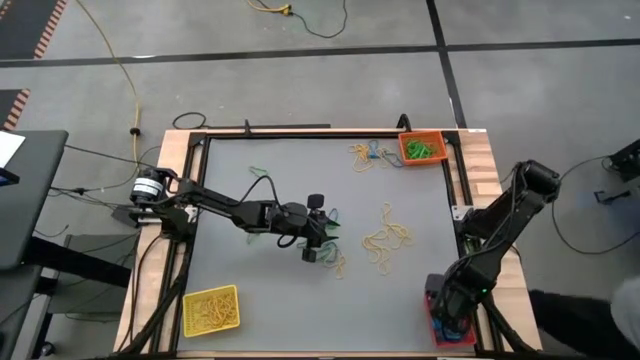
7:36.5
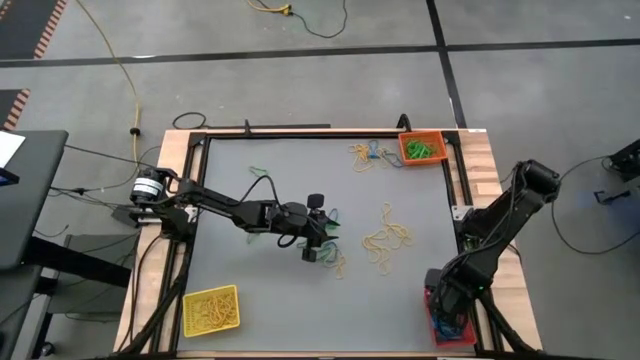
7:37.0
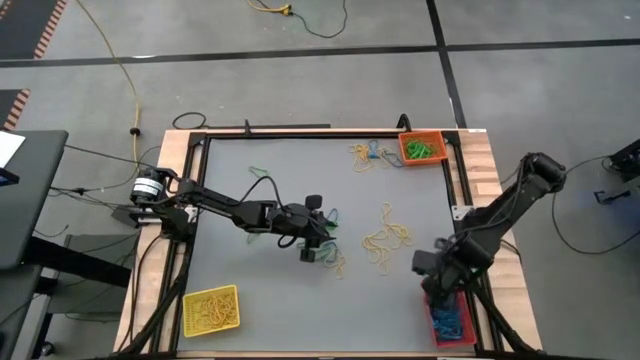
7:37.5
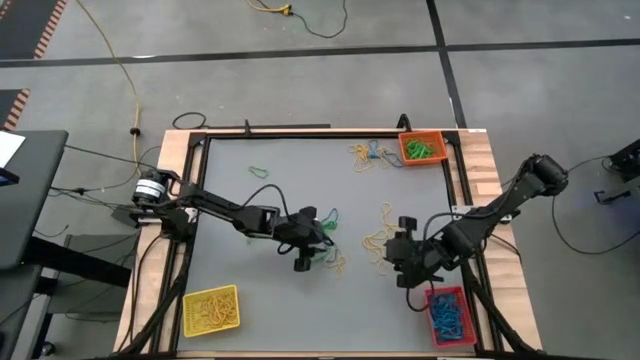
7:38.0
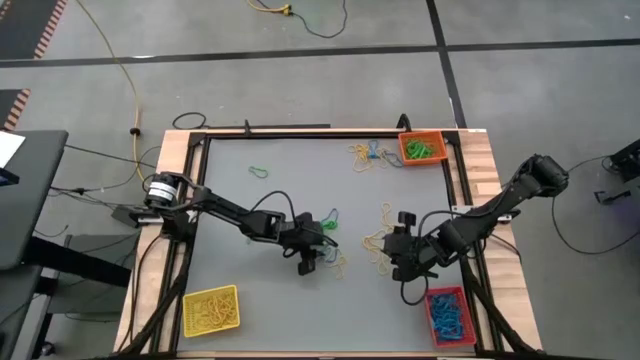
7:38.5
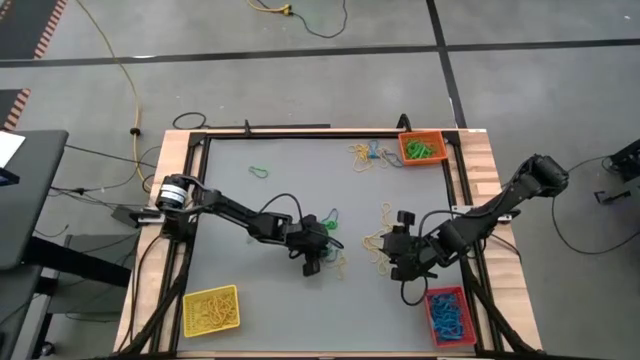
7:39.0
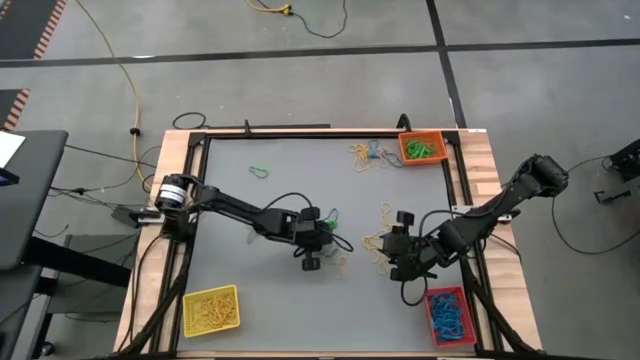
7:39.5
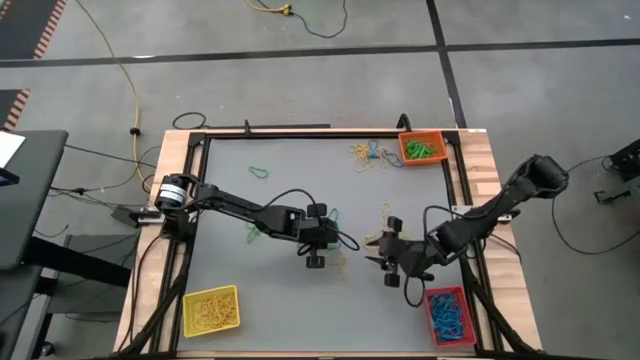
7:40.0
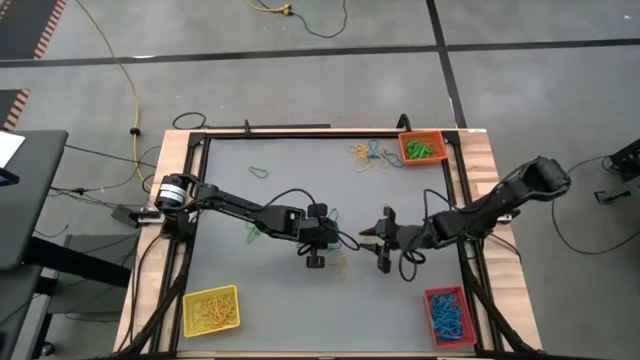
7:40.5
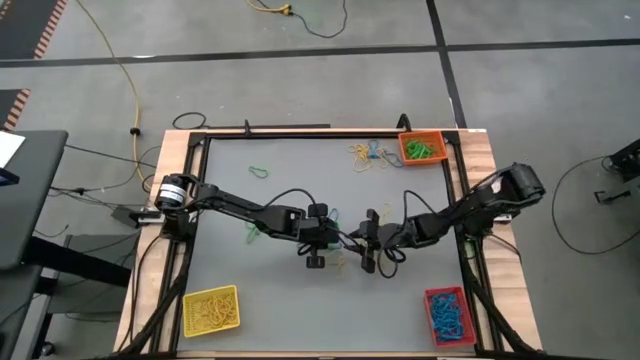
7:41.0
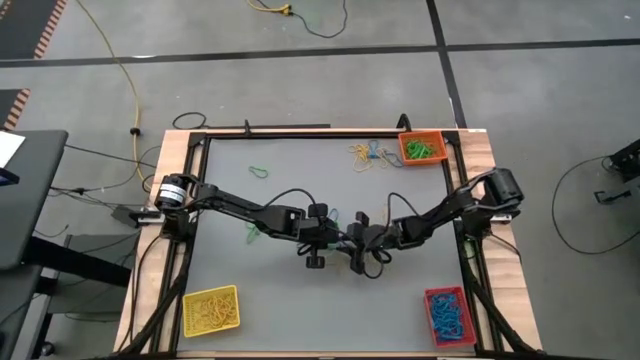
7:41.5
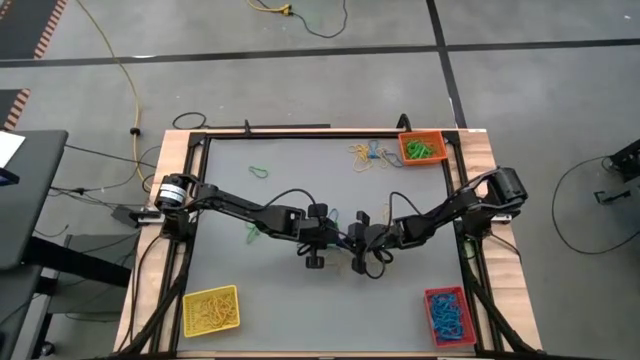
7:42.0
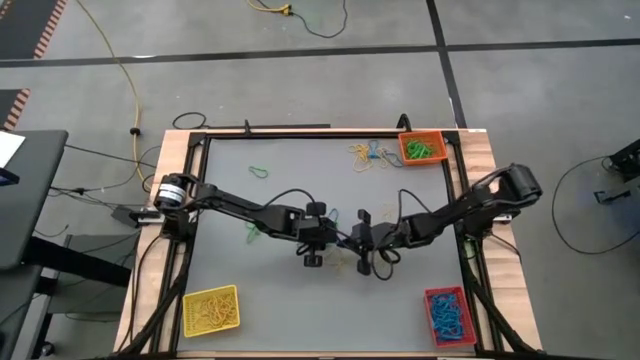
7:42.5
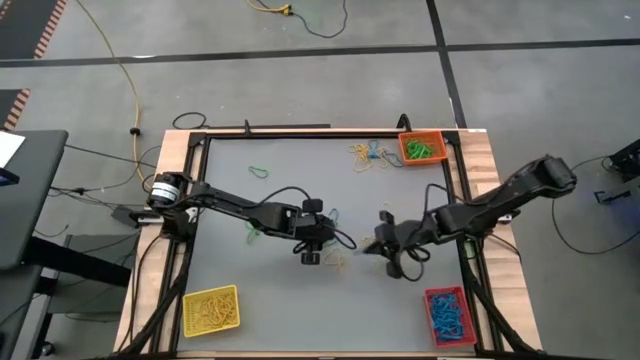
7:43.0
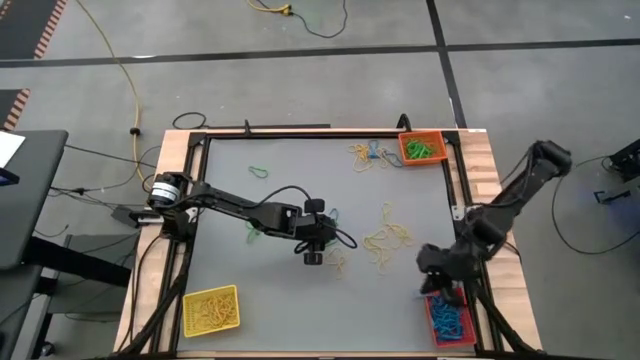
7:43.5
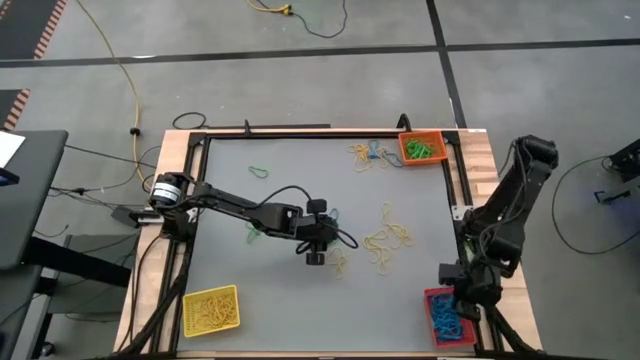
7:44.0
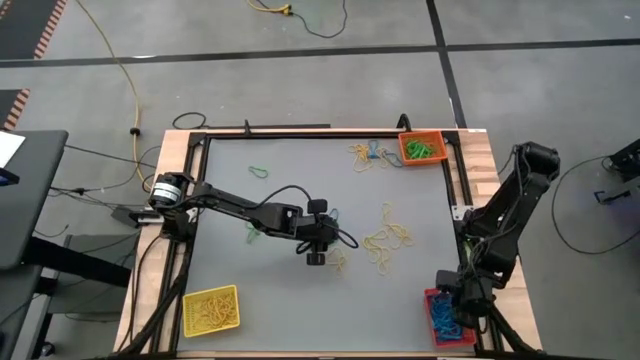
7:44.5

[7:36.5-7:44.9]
Task: Sort rubber bands into baskets
Put the blue rubber band into the red bin

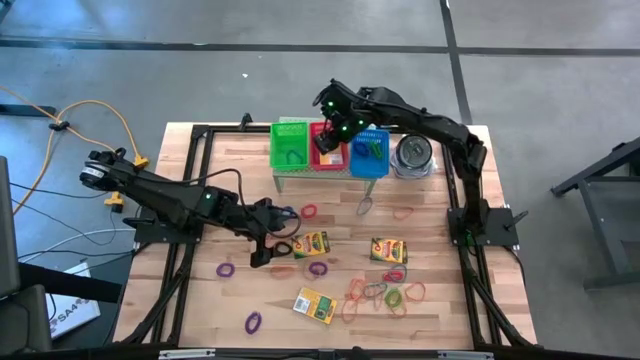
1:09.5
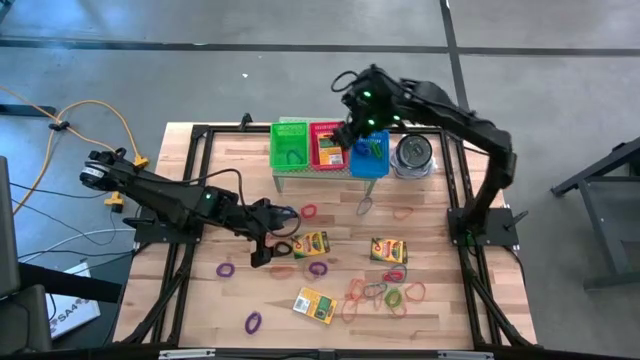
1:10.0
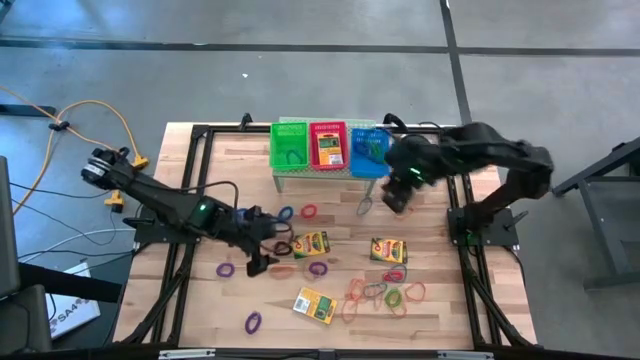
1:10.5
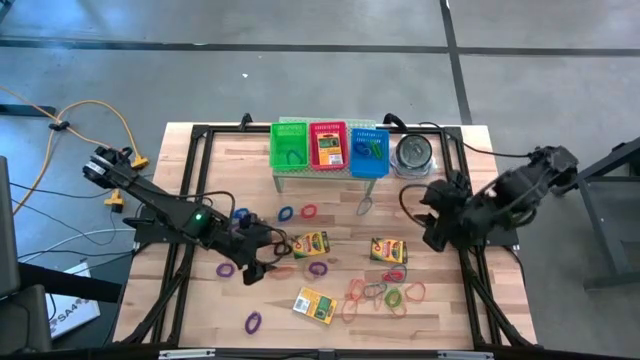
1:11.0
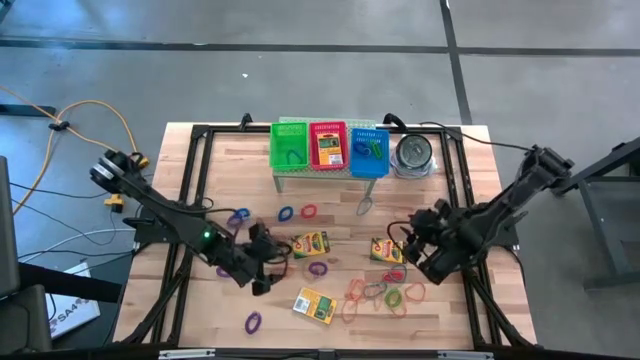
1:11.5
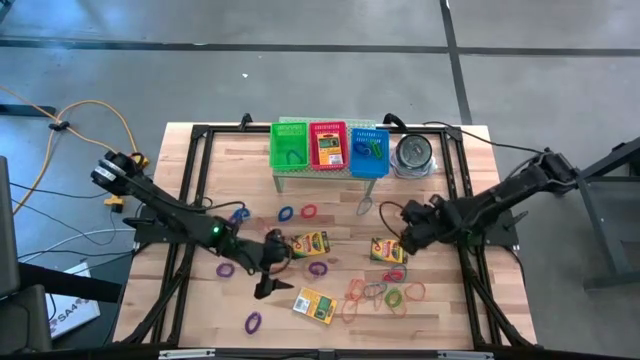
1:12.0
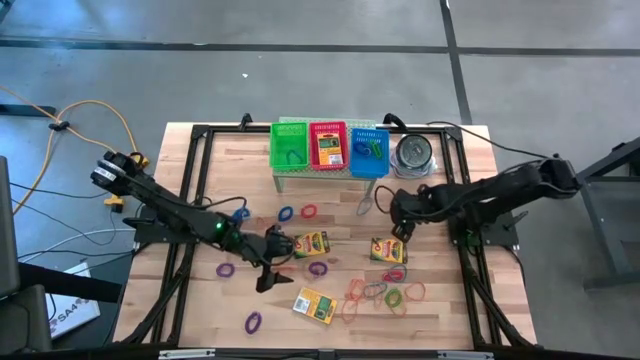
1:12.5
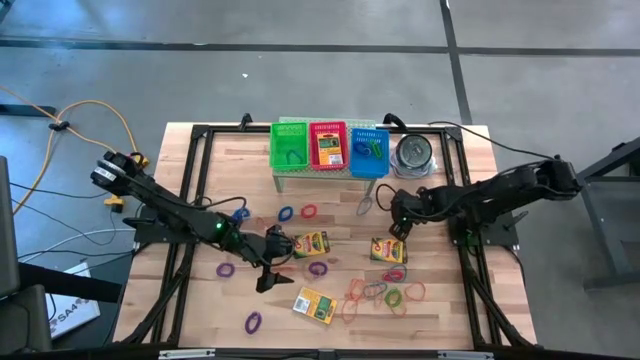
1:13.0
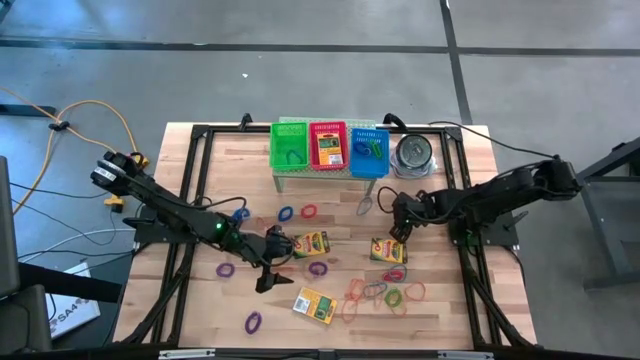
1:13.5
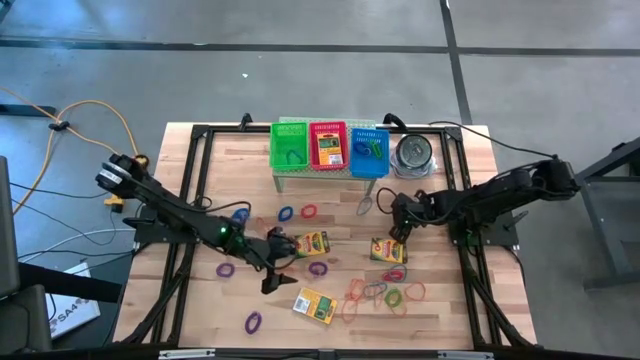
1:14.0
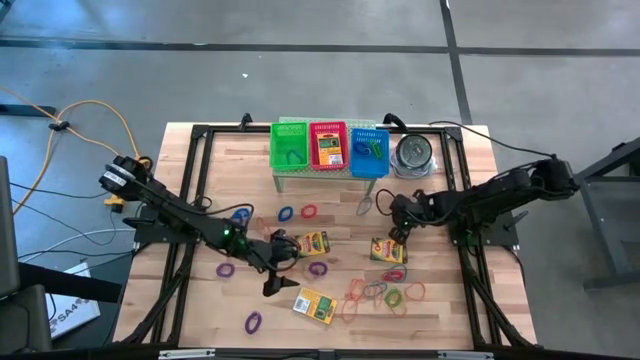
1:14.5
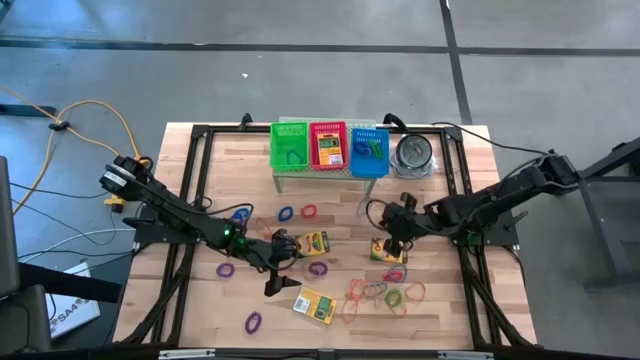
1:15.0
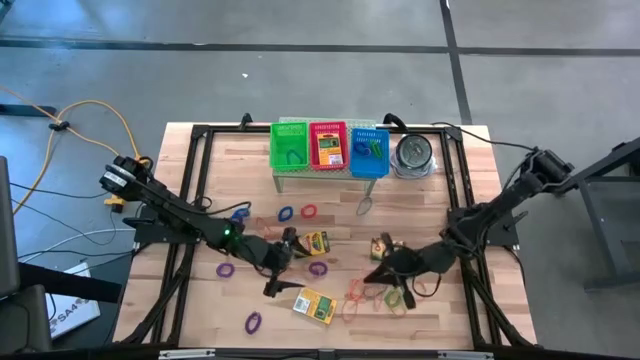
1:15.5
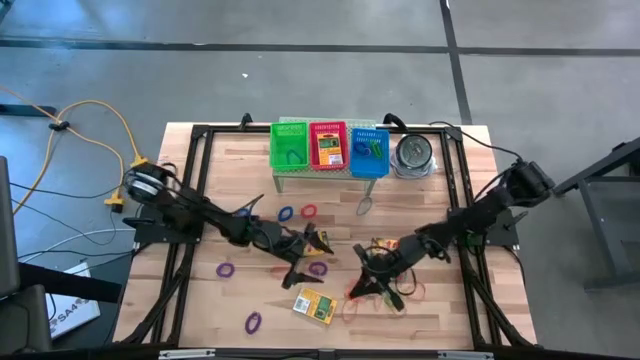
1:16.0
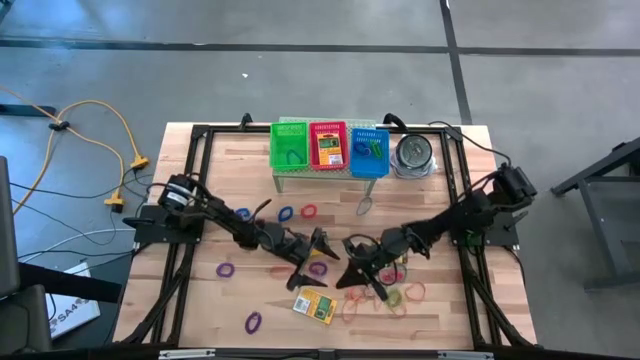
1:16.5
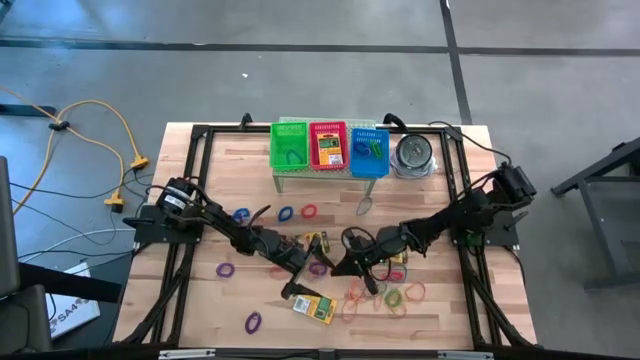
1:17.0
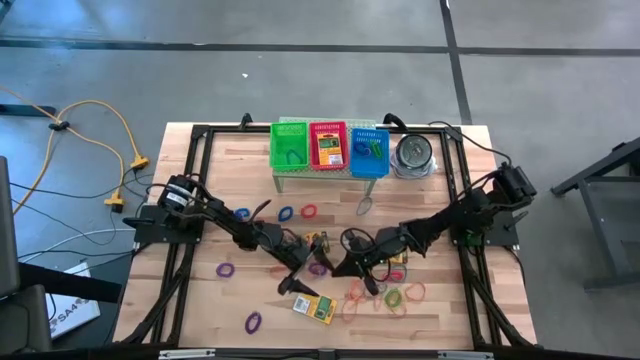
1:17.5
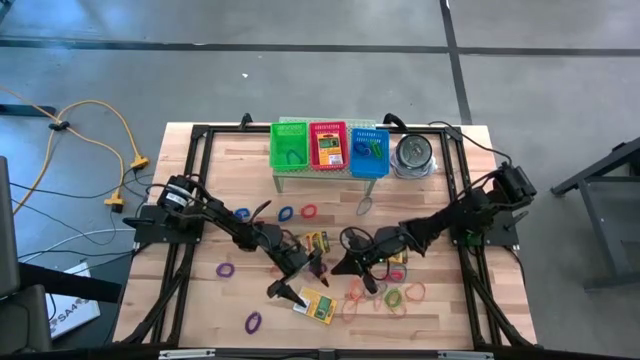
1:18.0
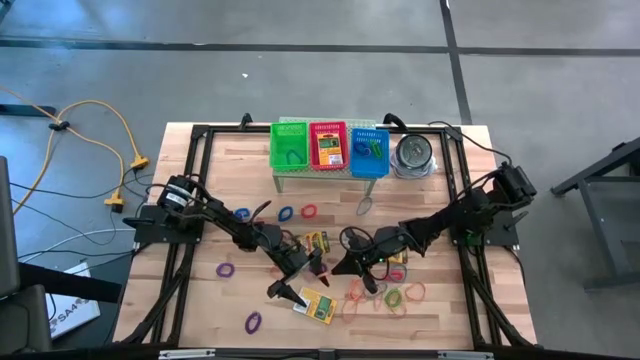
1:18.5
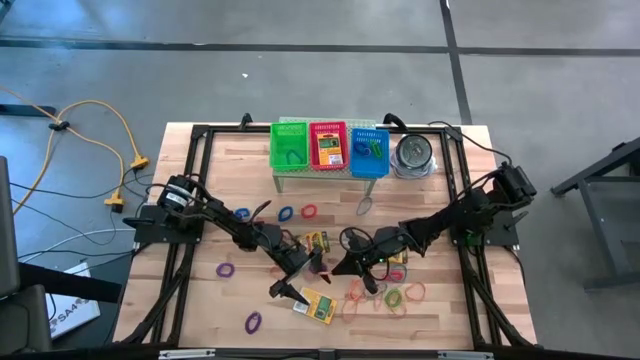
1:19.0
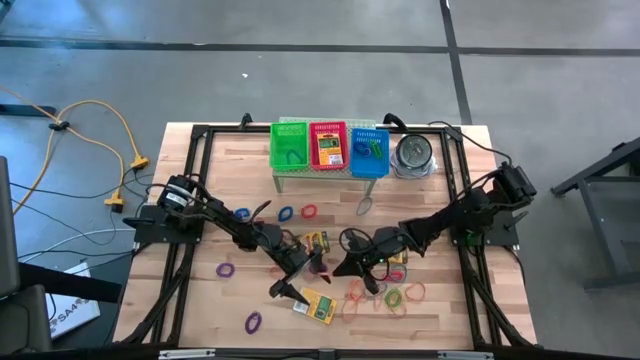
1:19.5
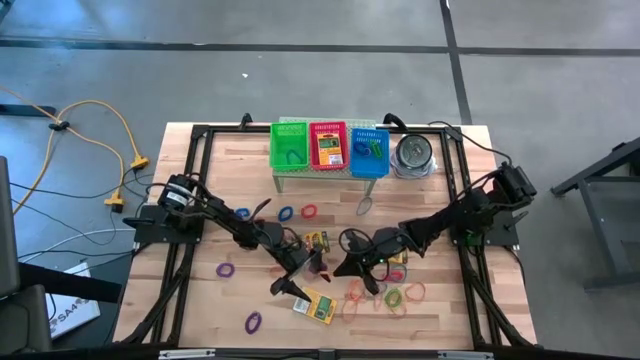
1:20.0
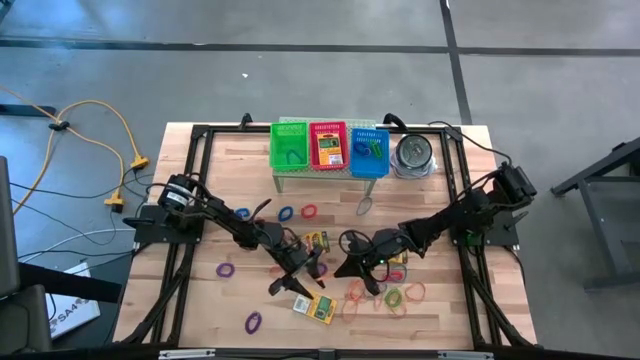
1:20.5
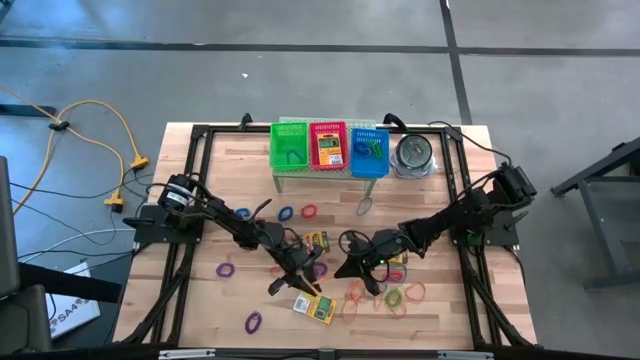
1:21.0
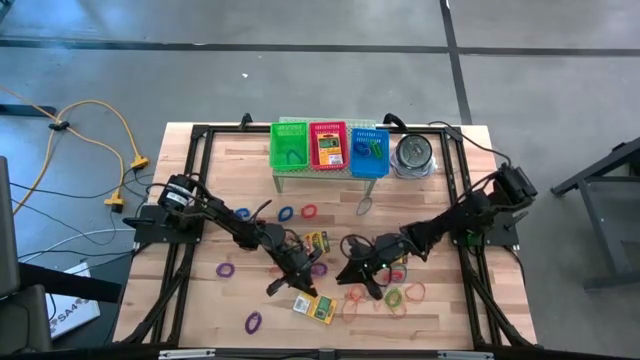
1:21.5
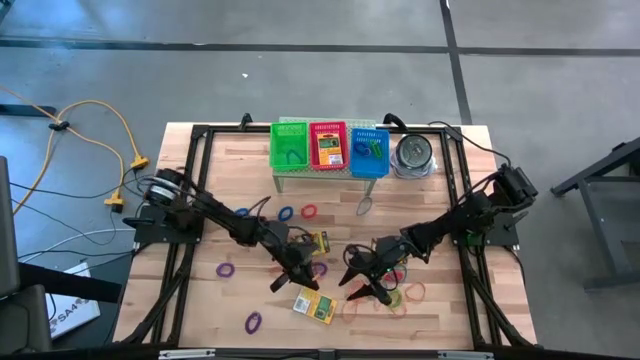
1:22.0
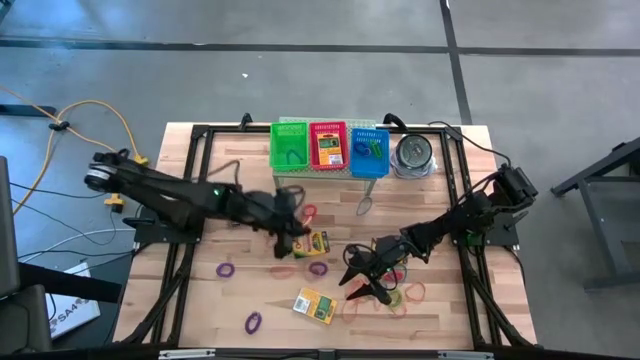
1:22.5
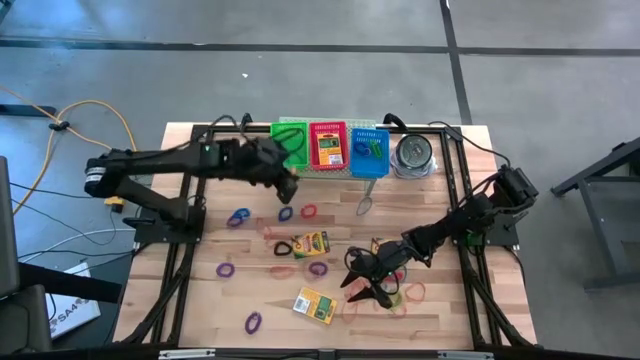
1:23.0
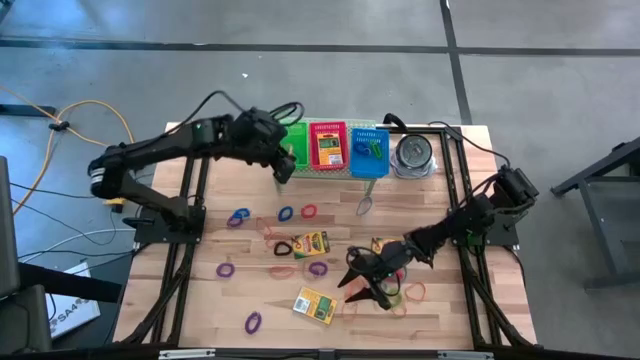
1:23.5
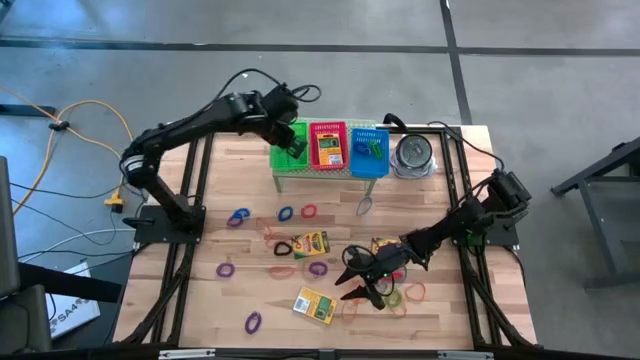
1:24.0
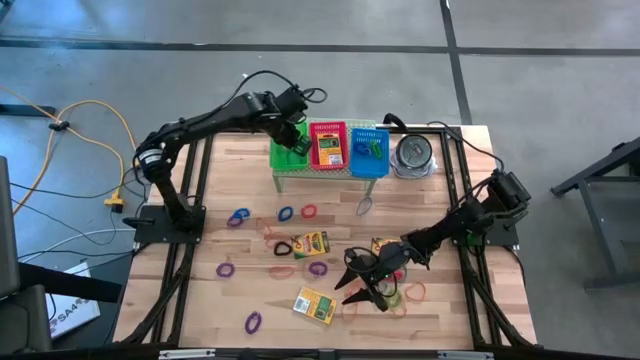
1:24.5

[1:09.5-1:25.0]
Task: Pick & Place Office Desk Supplies
Put the orange rubber band into the green bin on the shelf
